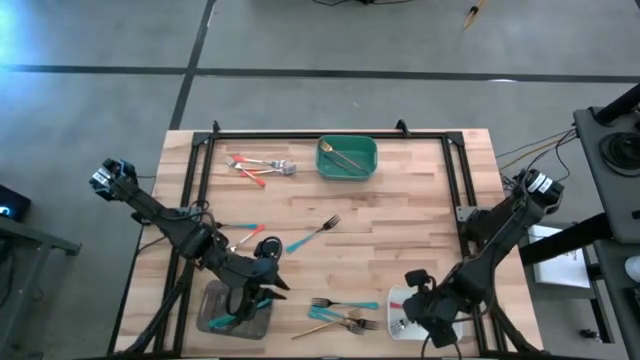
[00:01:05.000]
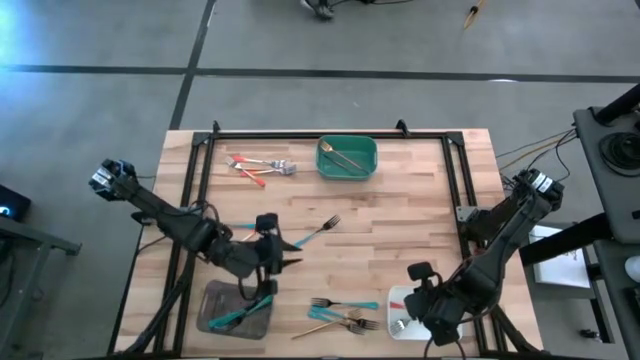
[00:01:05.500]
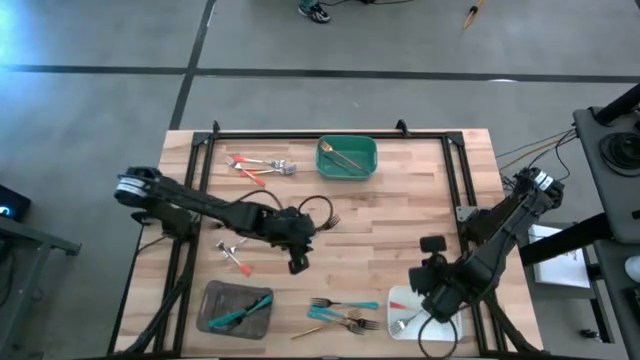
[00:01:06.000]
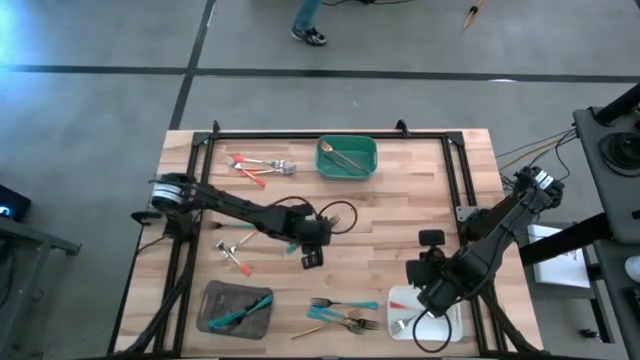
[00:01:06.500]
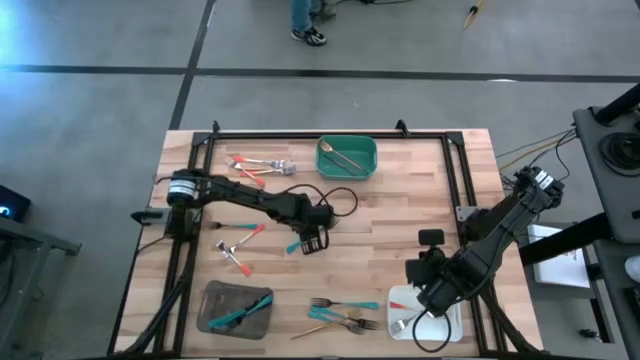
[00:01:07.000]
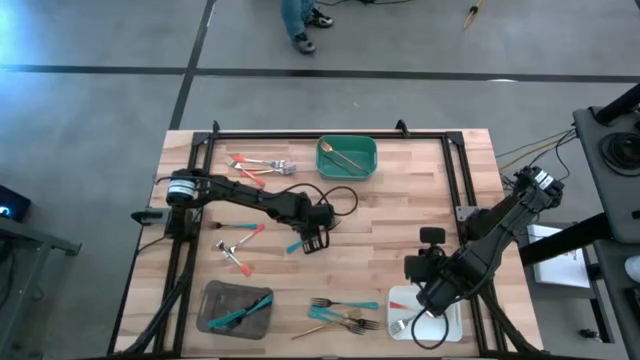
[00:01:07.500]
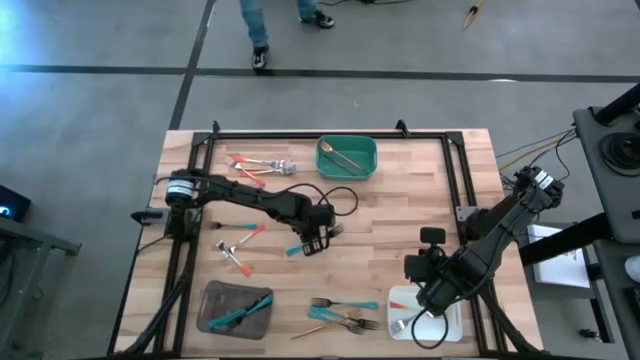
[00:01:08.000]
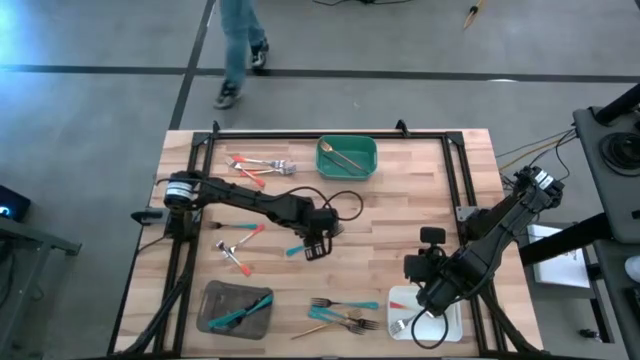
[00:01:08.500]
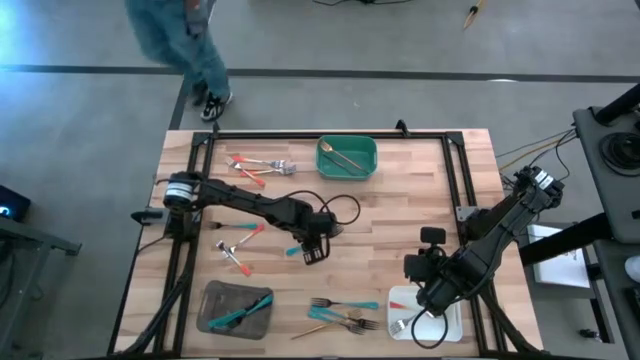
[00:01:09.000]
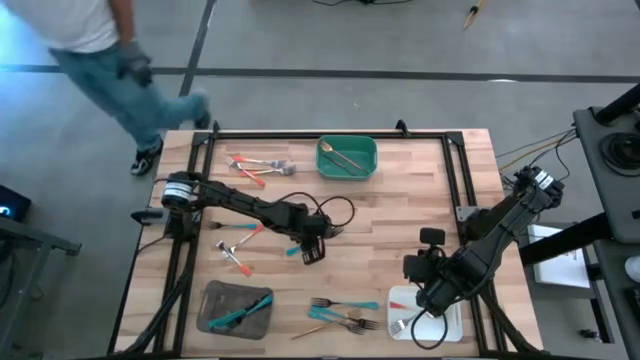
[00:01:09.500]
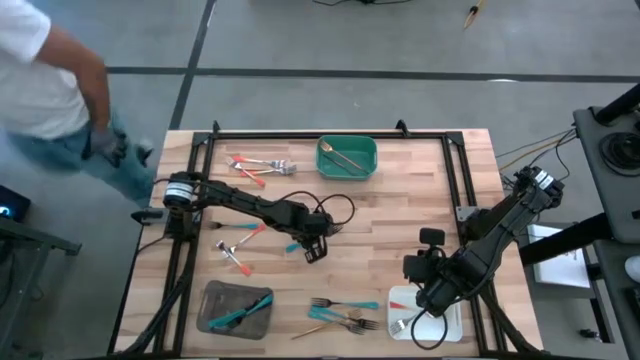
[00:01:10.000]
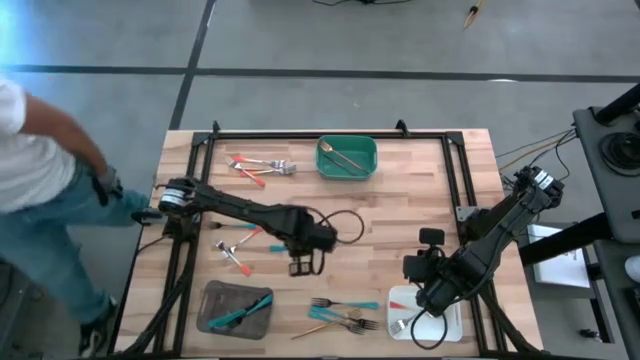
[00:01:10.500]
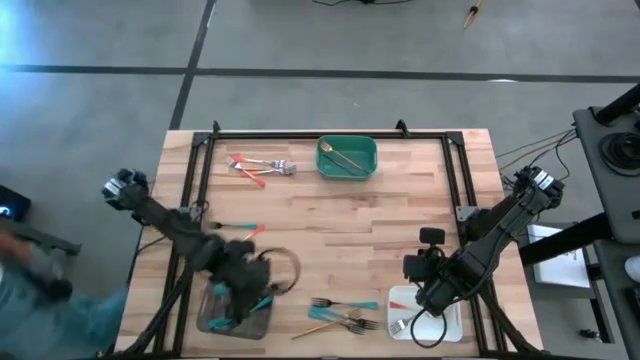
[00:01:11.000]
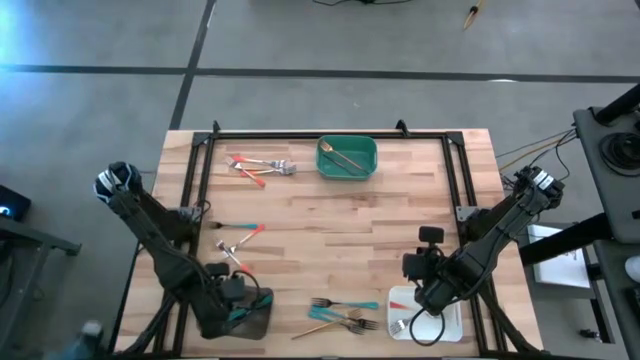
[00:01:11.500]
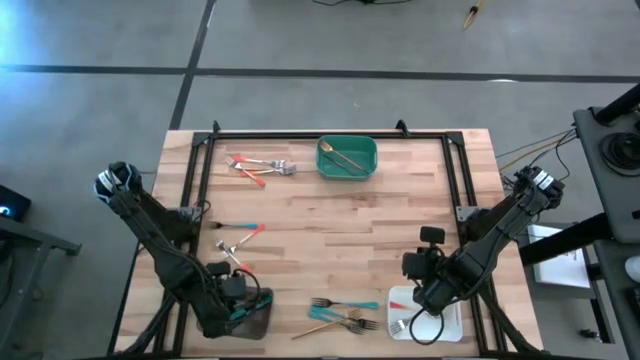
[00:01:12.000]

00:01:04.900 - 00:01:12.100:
Task: Sort silverware by color (type)
Put the blue fork into the black bin

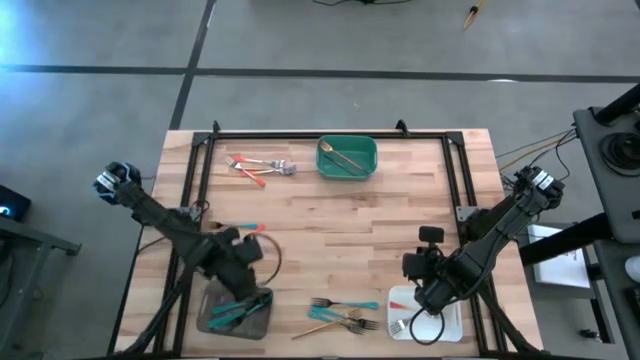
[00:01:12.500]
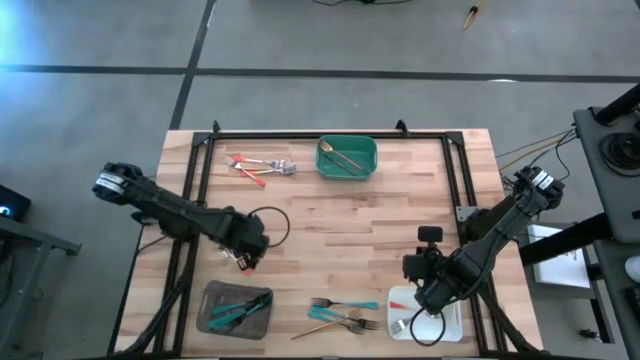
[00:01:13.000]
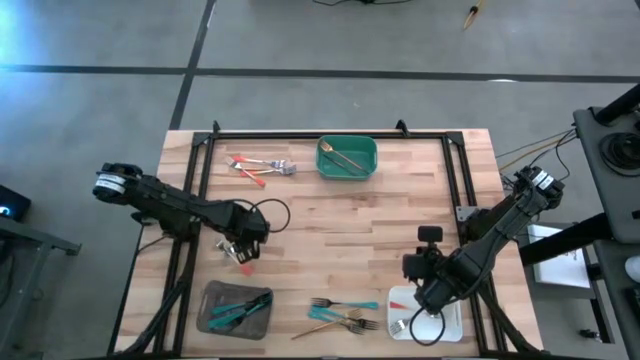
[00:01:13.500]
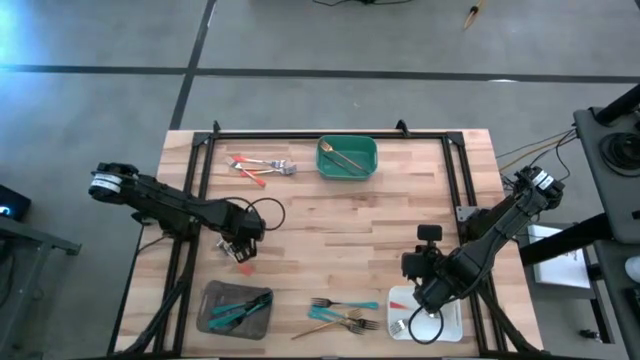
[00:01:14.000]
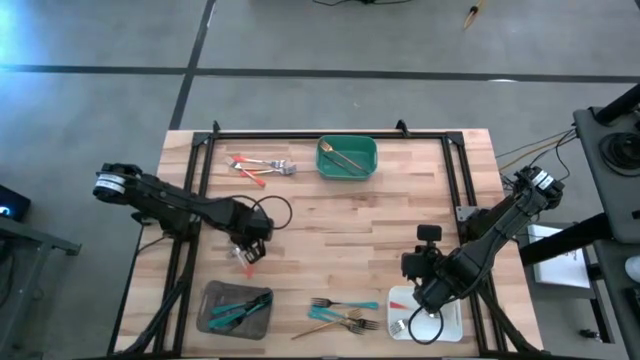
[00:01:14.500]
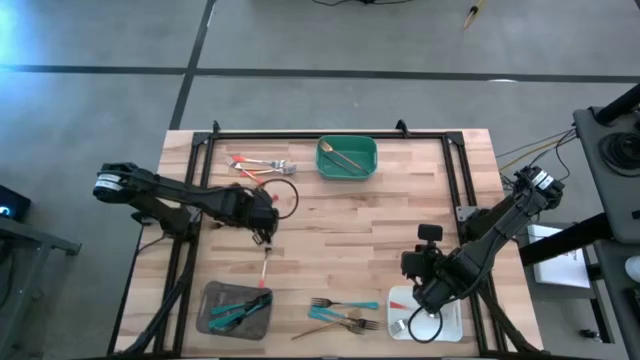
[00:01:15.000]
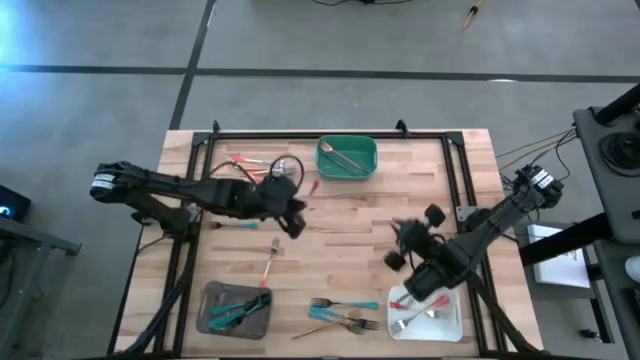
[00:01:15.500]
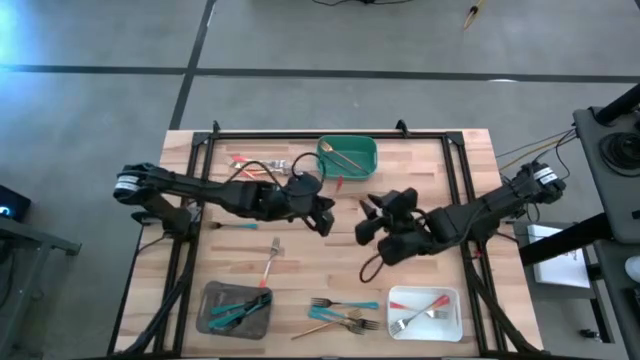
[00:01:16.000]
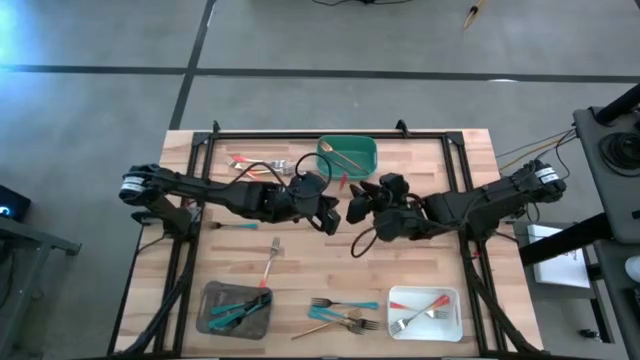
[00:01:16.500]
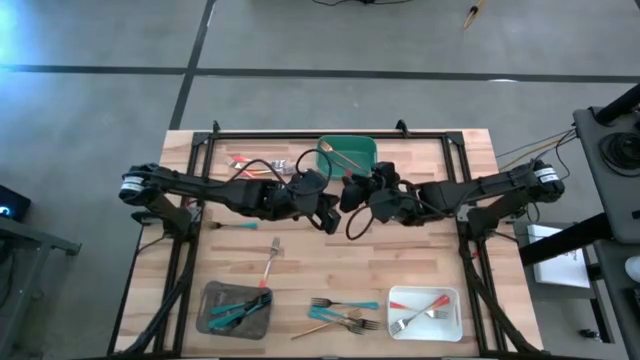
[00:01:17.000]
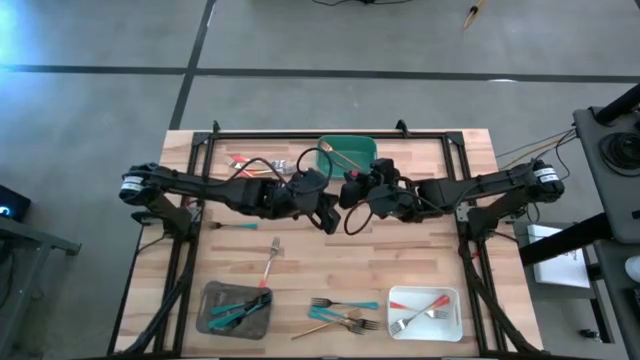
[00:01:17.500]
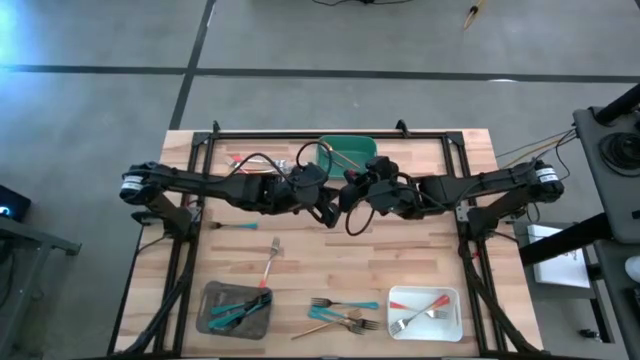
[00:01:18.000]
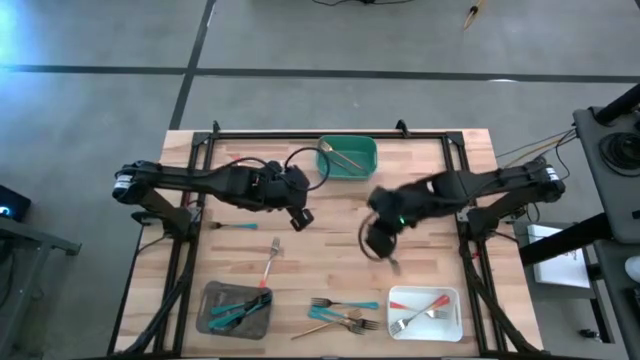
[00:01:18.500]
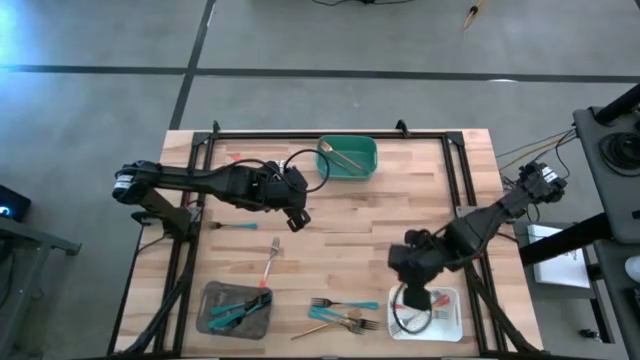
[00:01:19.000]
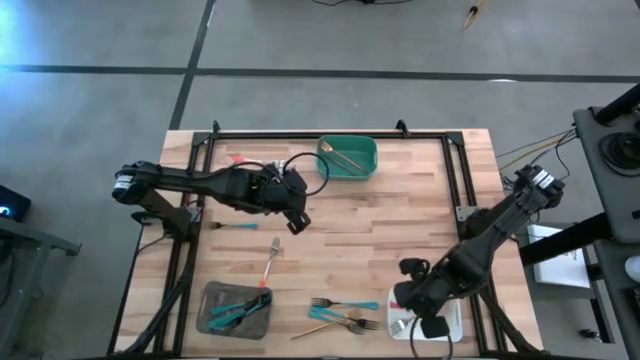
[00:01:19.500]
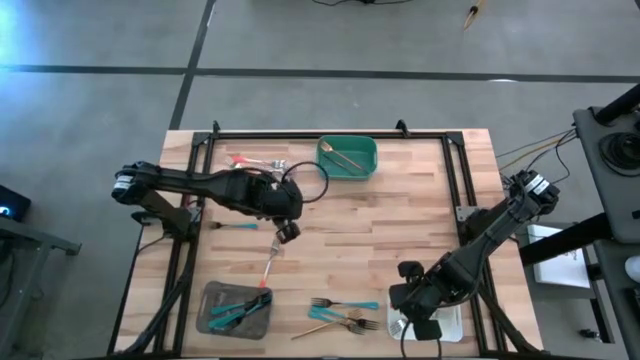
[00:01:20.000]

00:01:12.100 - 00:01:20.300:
Put the orange fork into the white bin

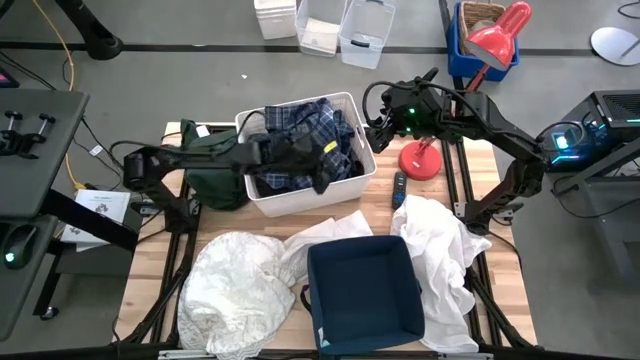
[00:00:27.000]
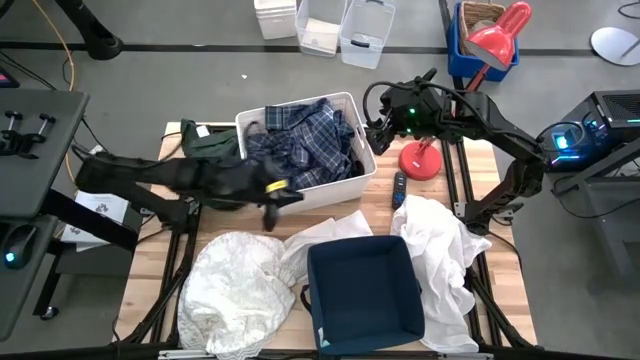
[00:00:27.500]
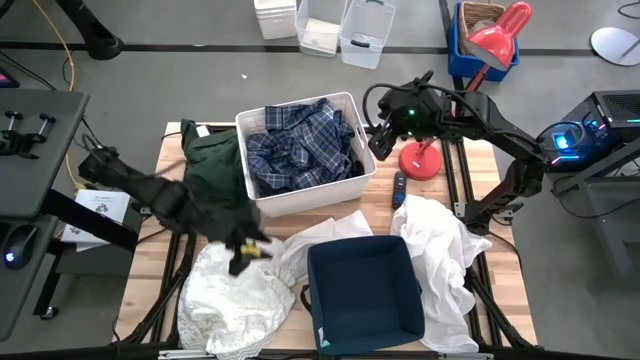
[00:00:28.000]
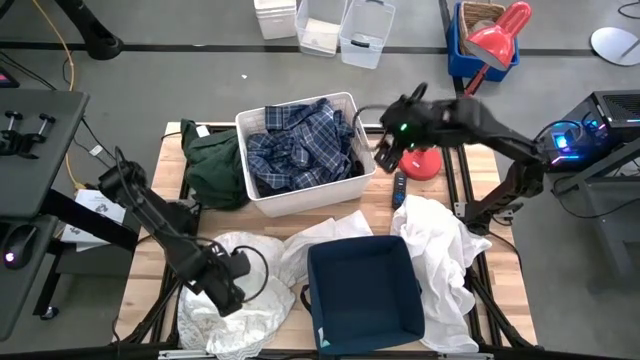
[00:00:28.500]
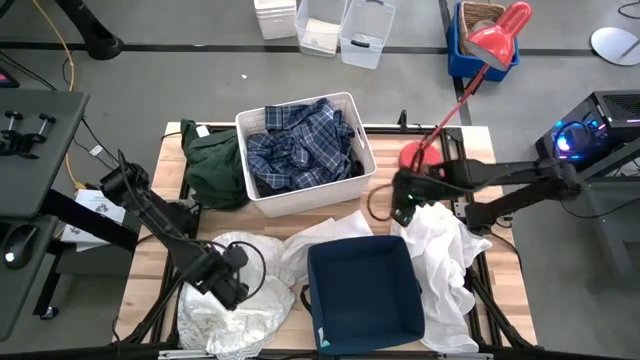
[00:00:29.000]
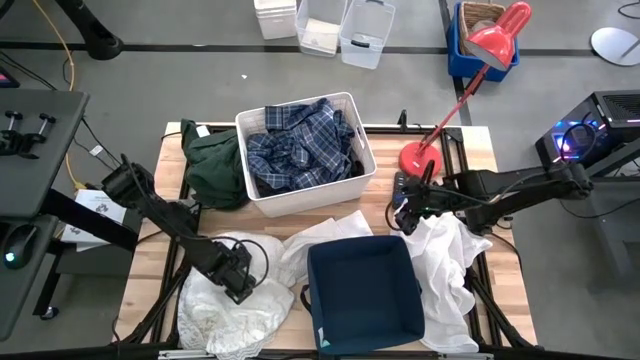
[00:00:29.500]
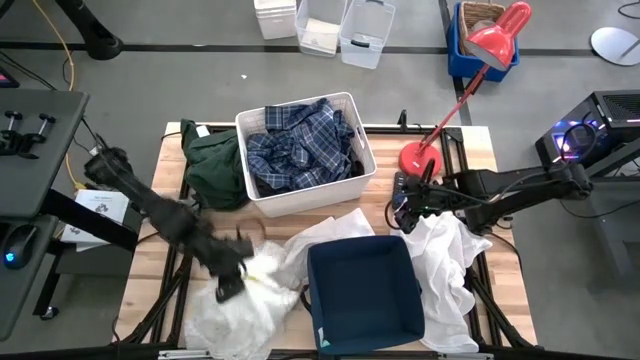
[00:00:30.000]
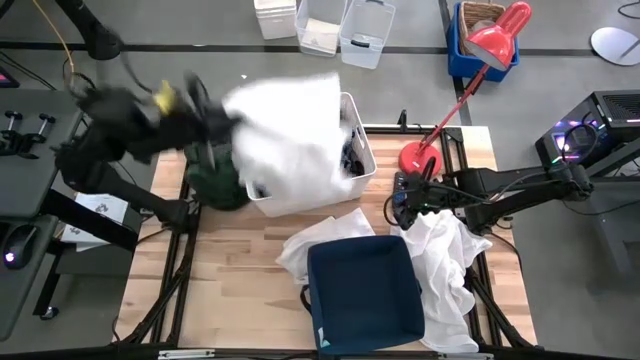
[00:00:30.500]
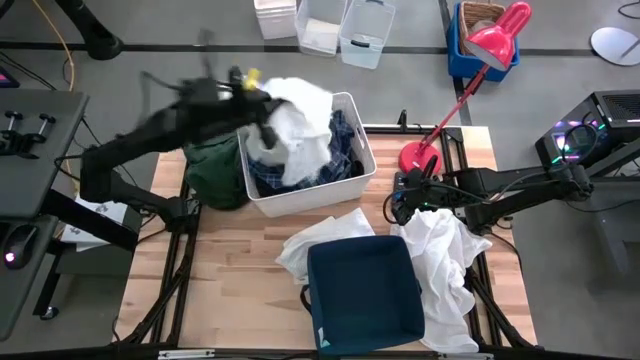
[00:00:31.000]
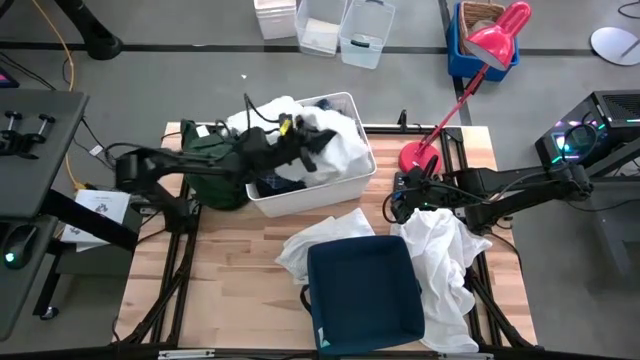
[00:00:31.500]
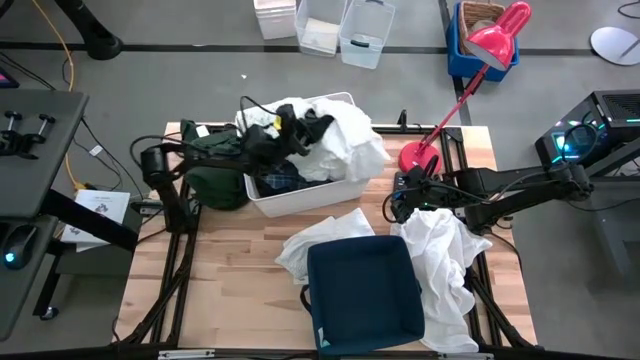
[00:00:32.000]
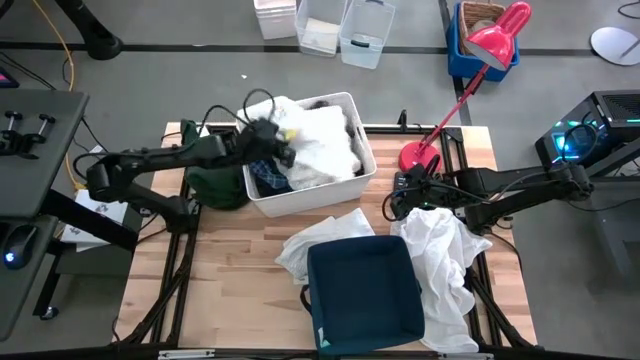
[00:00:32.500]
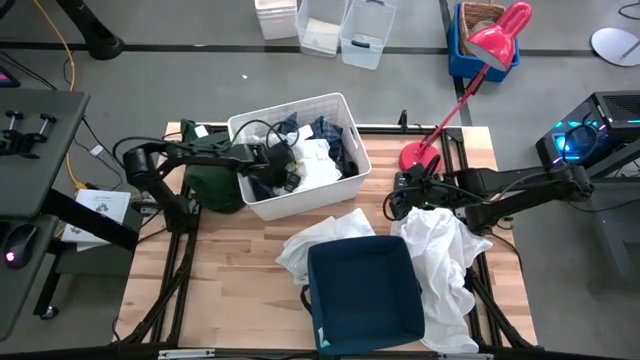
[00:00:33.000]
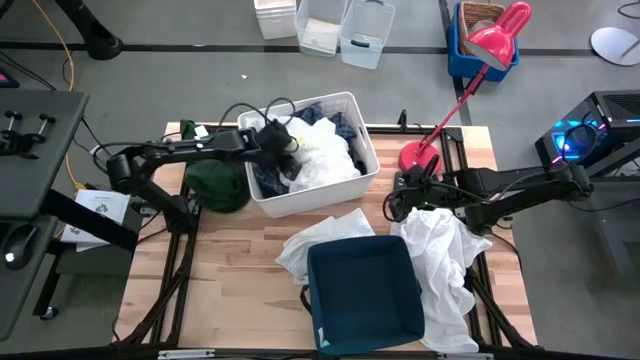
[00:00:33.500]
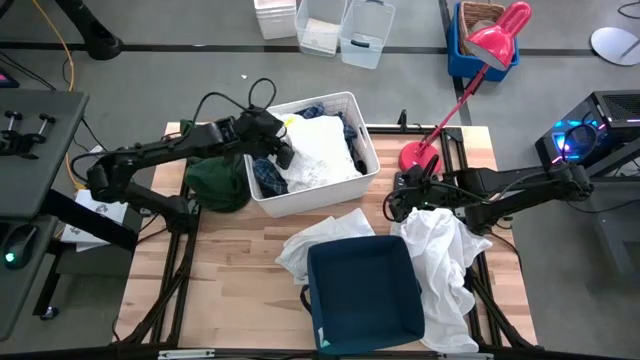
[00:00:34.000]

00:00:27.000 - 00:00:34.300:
Task: Sort clothes
Put the white dress into the blue laundry bin
